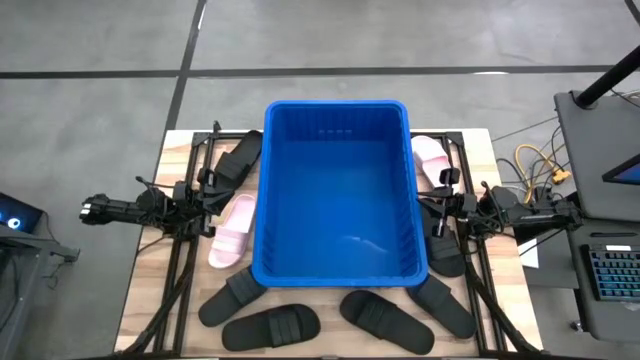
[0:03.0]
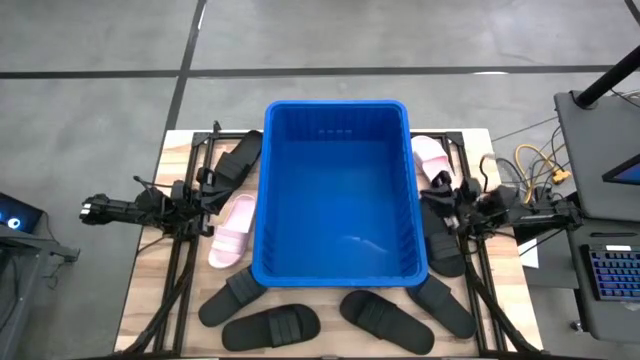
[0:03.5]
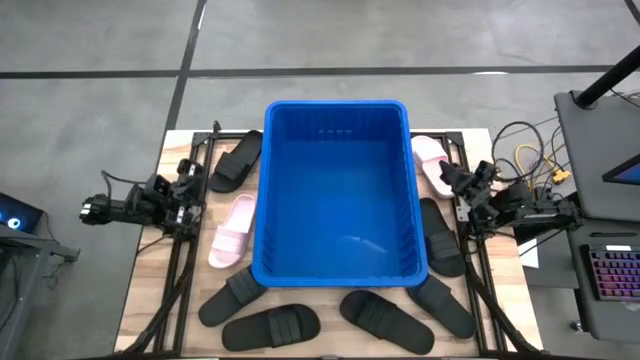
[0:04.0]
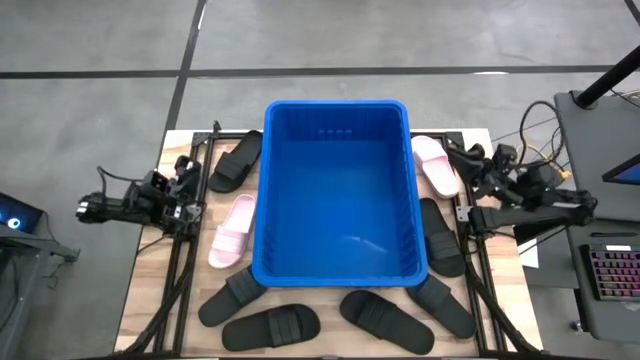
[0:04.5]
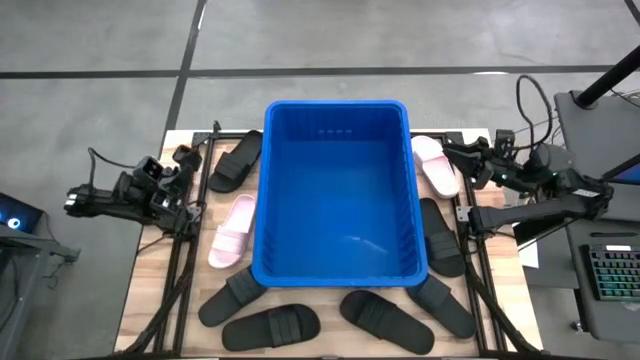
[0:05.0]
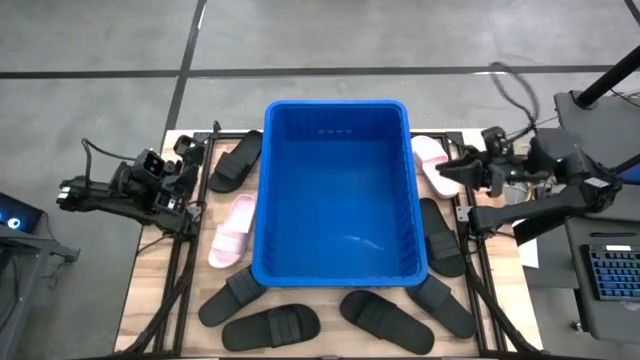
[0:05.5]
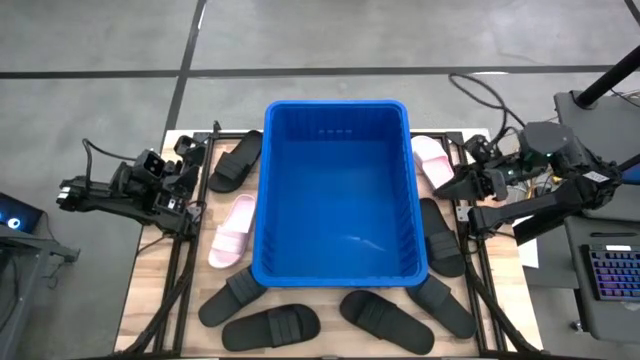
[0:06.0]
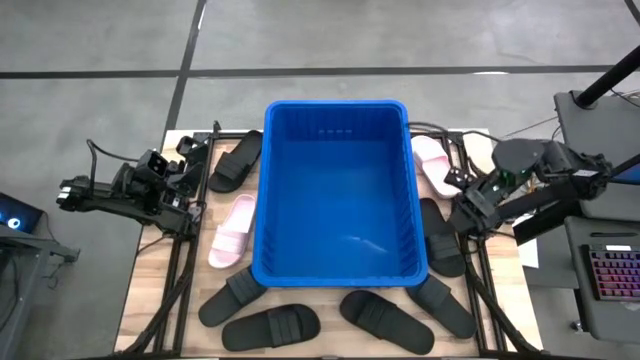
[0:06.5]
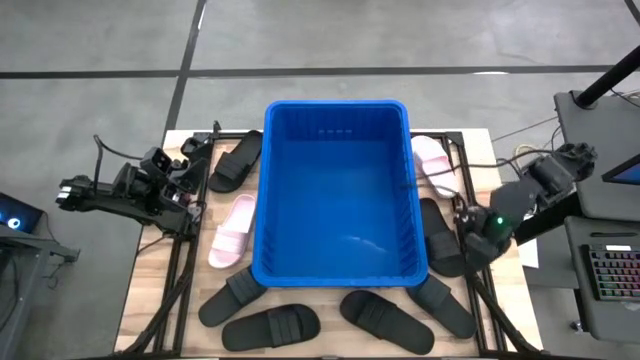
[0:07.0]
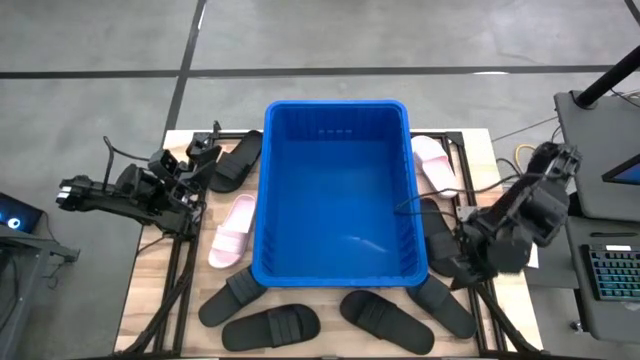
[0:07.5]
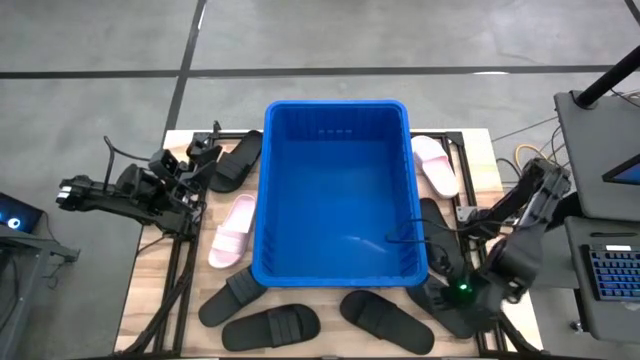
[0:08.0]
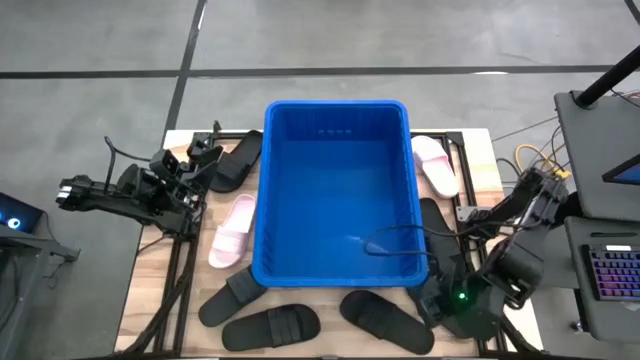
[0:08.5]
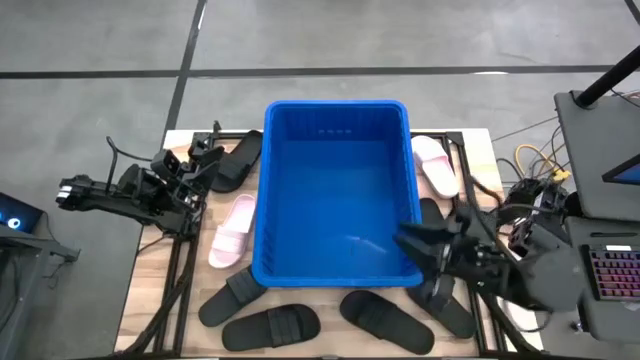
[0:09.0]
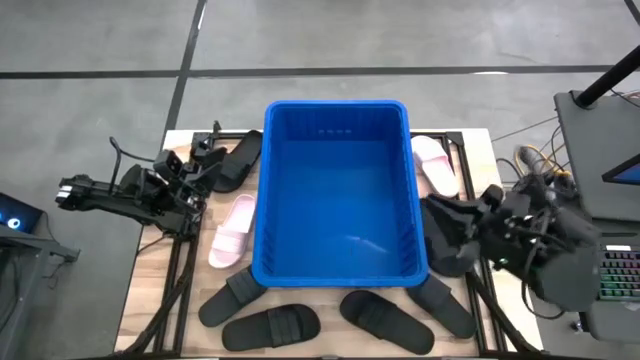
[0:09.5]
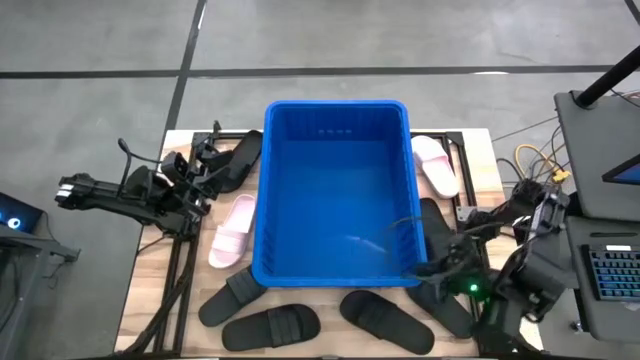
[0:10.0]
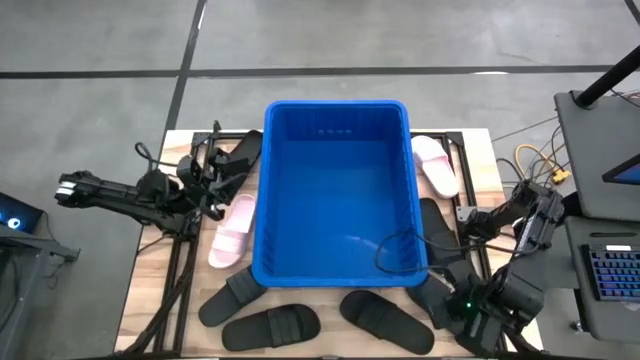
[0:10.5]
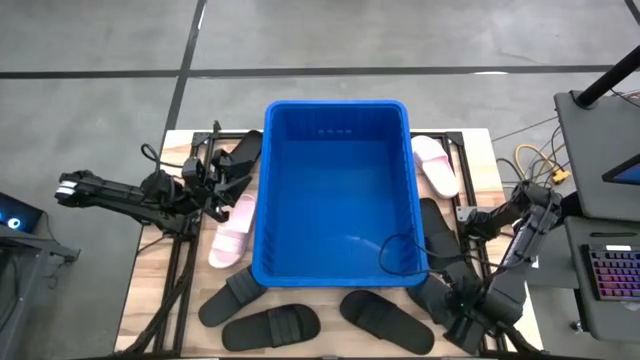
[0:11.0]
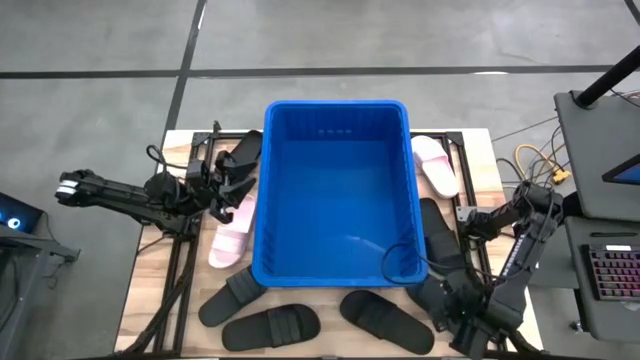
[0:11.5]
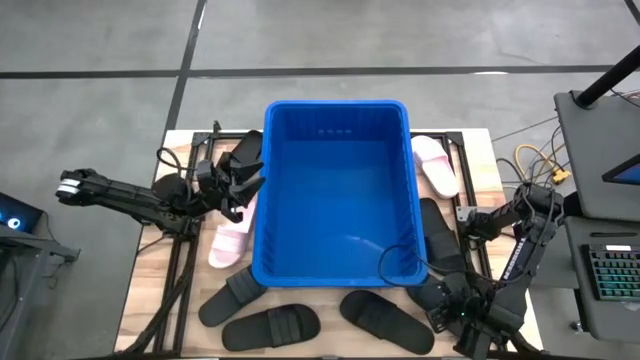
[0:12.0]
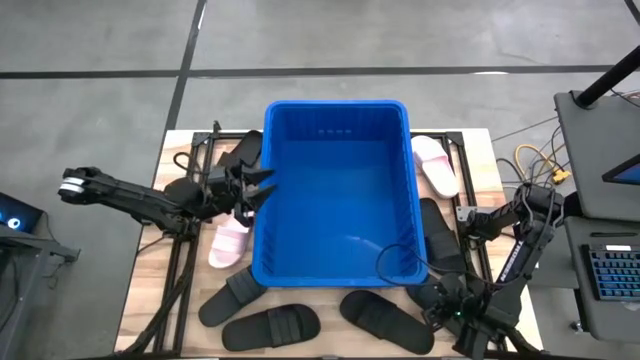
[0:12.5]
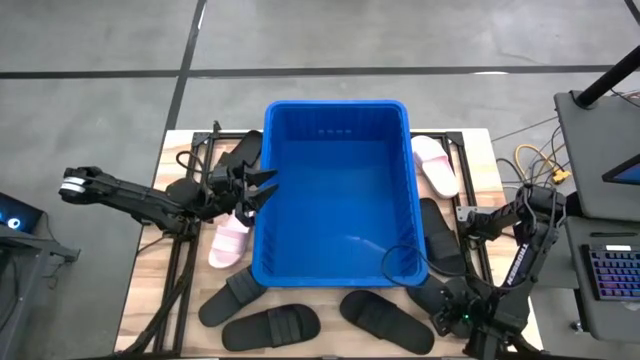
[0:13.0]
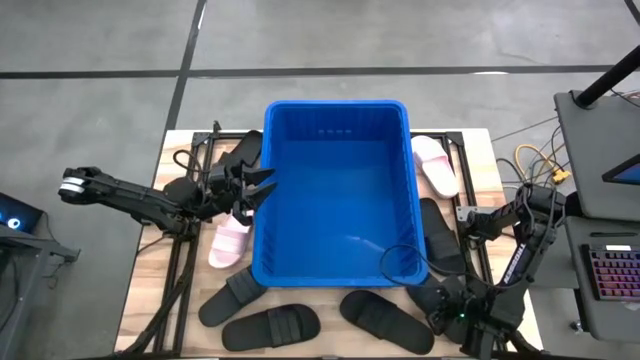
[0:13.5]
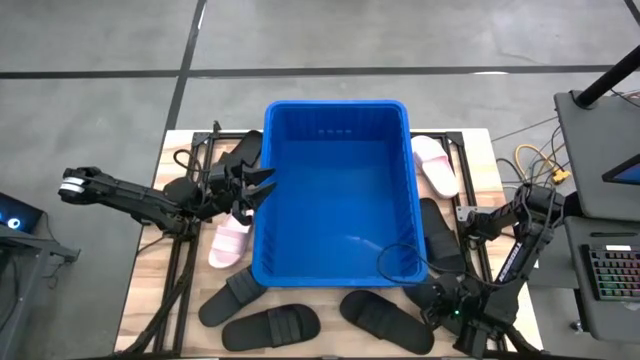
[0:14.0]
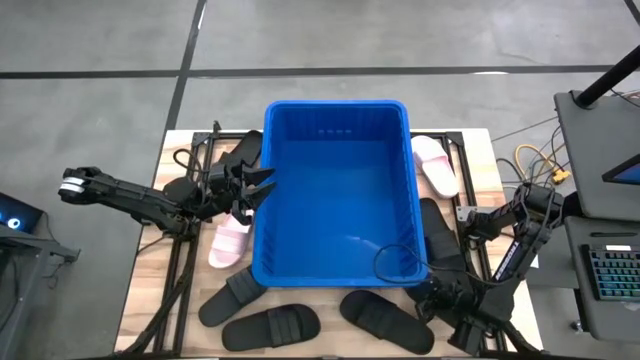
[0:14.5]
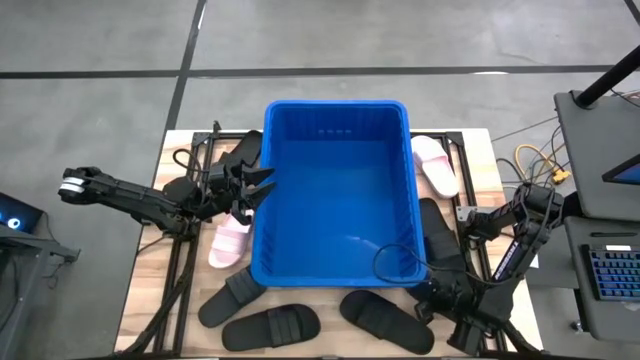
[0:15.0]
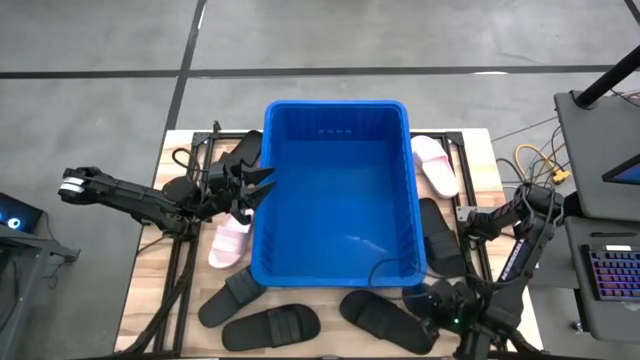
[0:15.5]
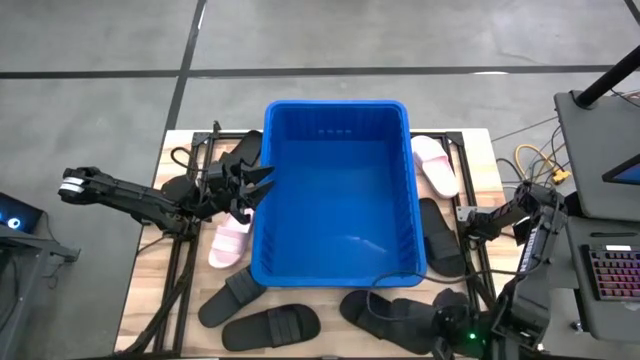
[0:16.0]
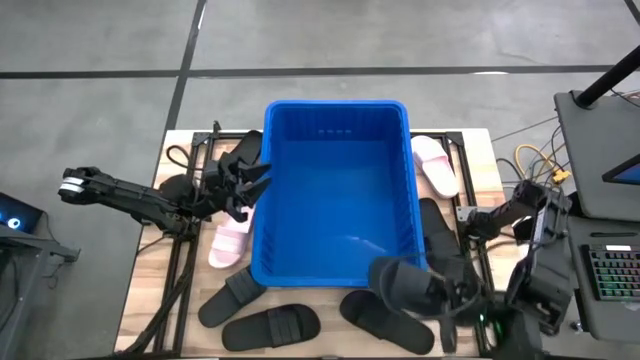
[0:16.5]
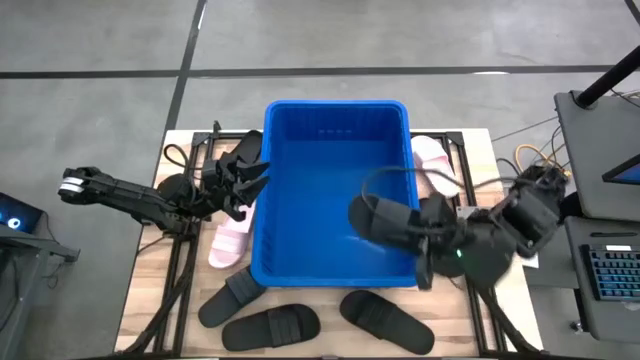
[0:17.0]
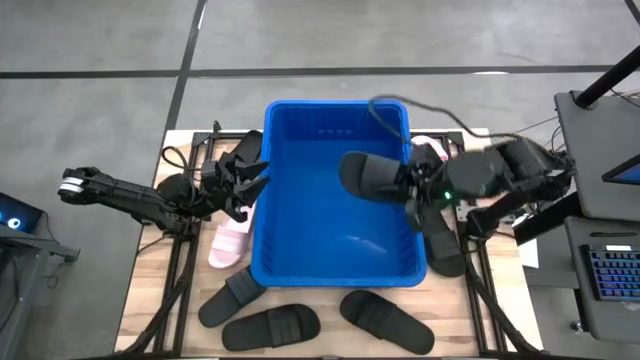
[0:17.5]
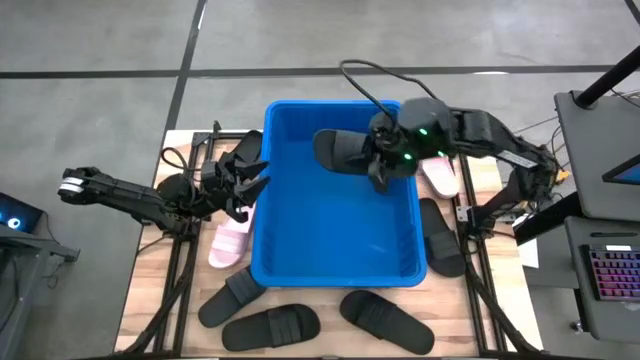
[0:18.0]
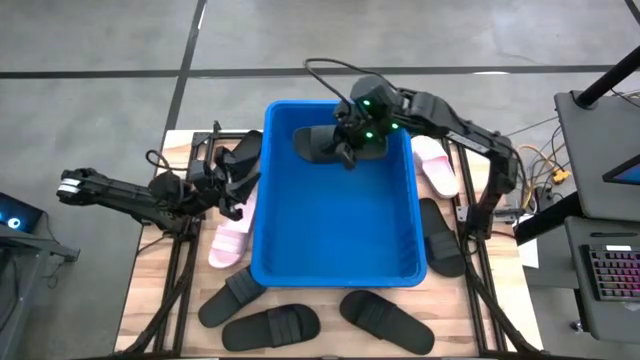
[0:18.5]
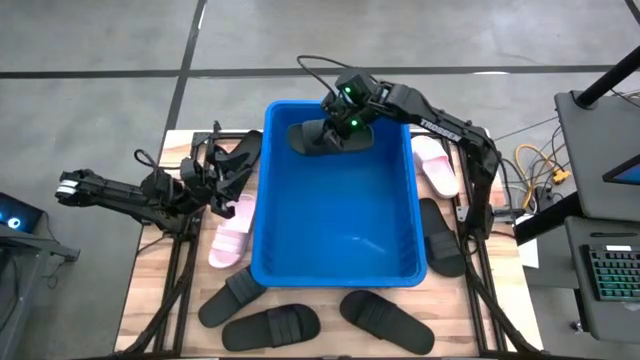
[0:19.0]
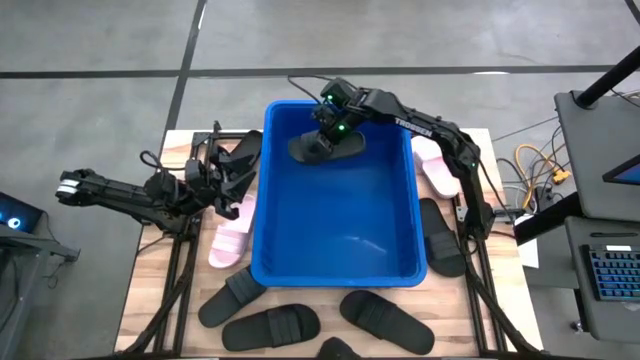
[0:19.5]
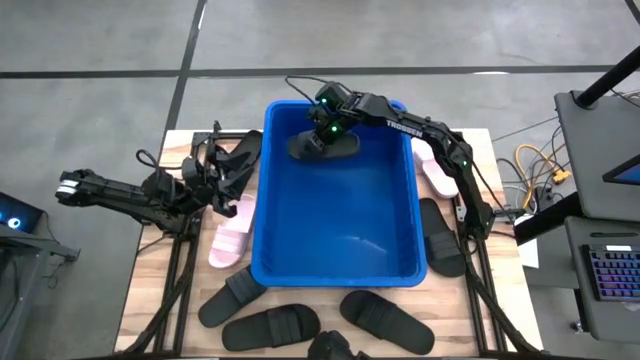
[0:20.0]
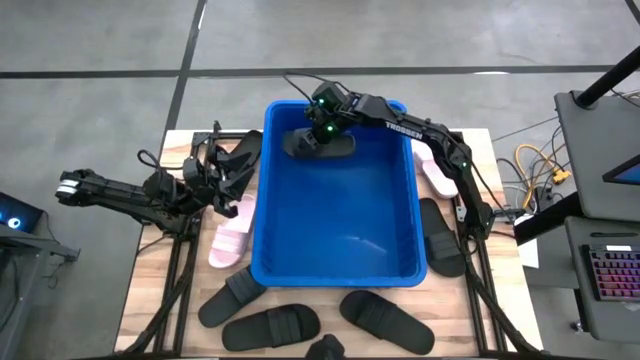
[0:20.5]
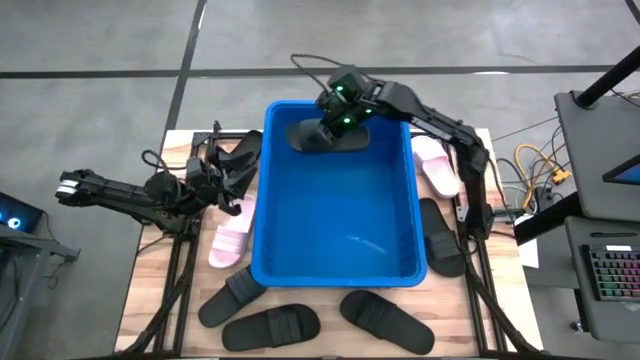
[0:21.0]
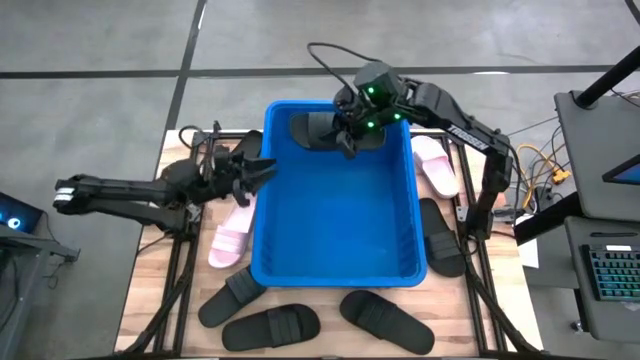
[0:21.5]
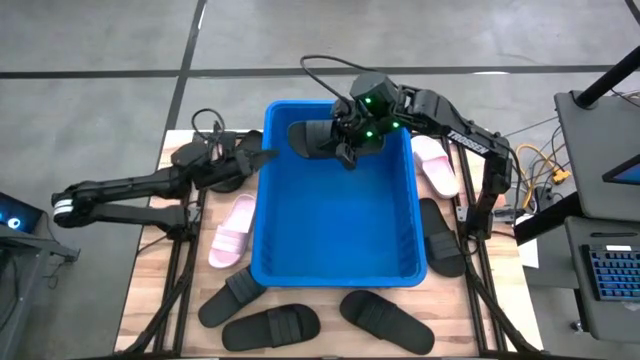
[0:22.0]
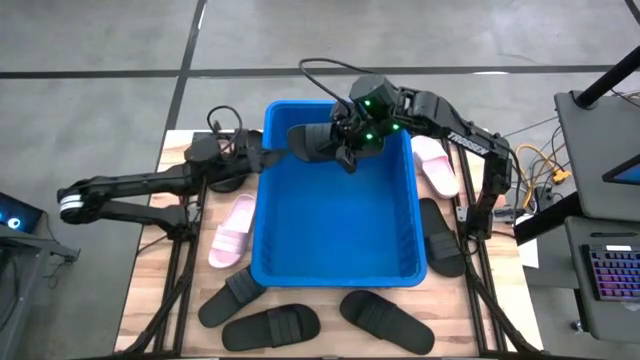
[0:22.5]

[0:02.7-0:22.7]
Task: Pick and place slides into bin
Put the black slide into the blue bin
